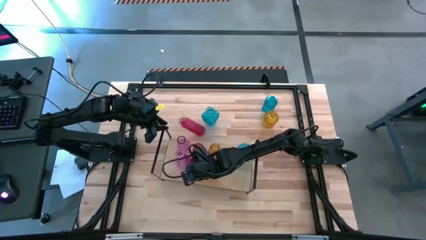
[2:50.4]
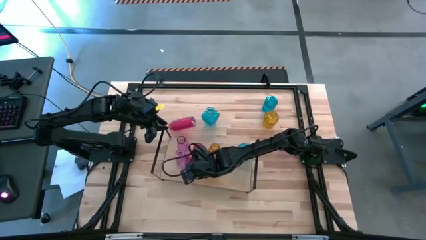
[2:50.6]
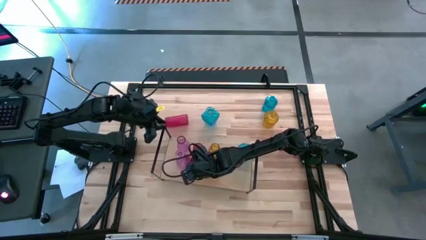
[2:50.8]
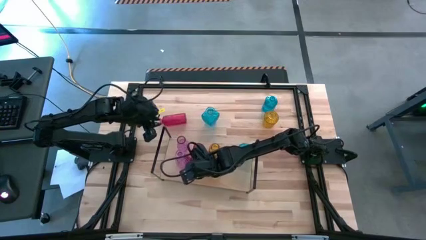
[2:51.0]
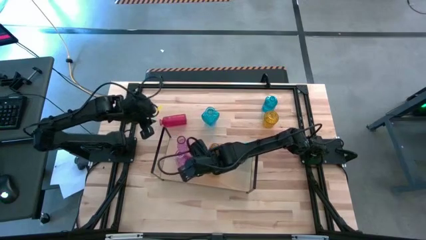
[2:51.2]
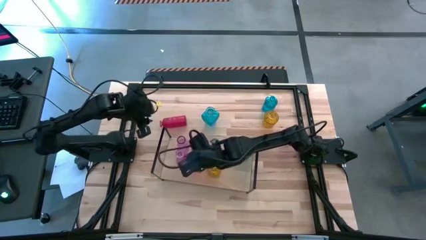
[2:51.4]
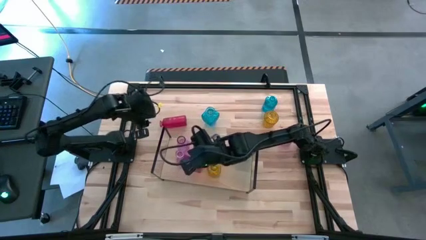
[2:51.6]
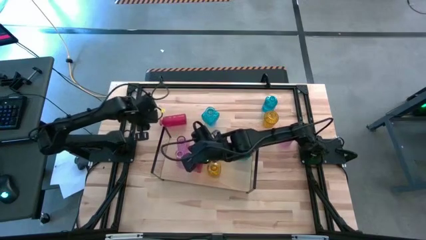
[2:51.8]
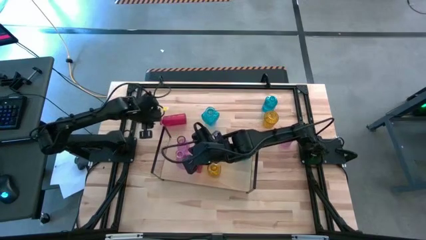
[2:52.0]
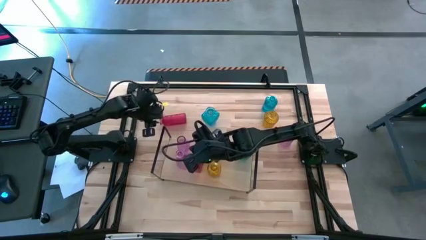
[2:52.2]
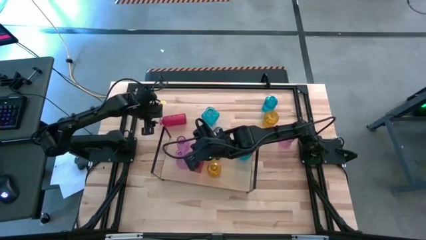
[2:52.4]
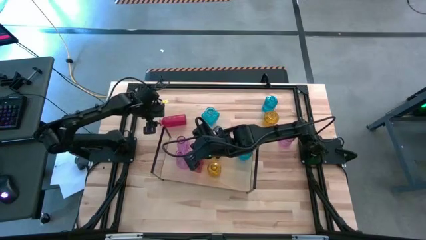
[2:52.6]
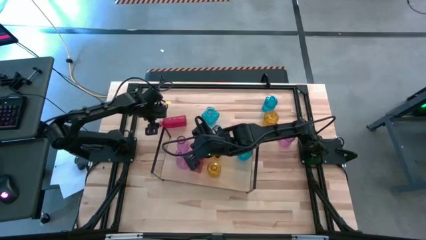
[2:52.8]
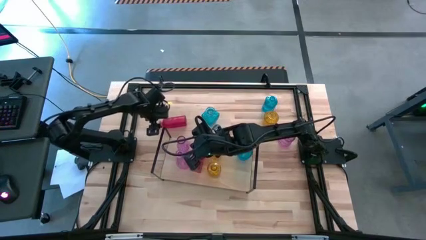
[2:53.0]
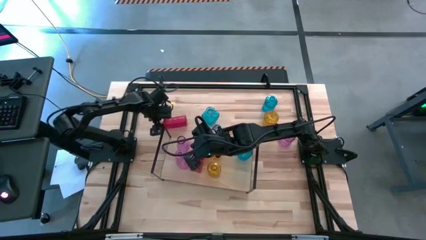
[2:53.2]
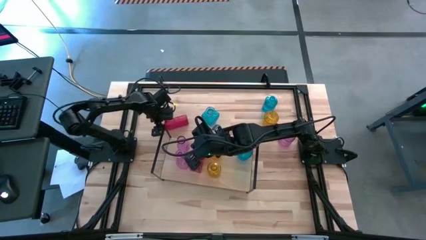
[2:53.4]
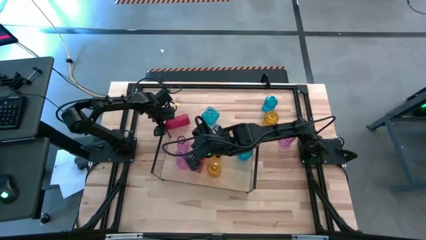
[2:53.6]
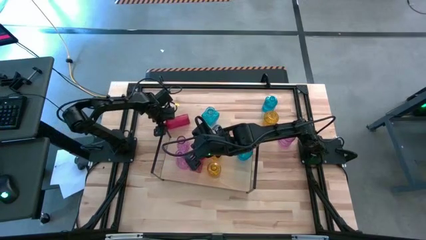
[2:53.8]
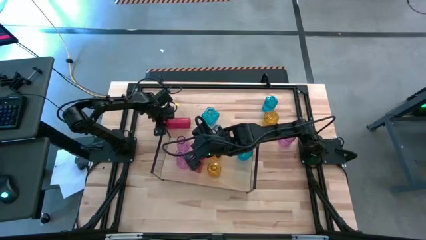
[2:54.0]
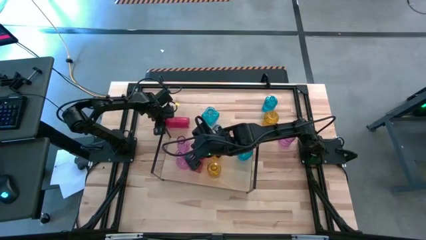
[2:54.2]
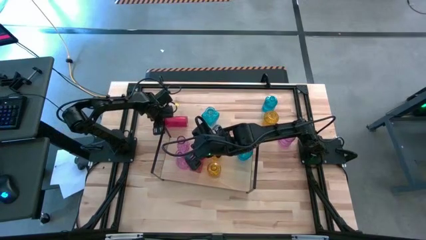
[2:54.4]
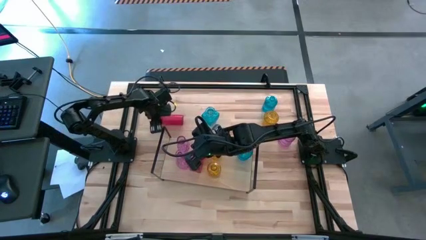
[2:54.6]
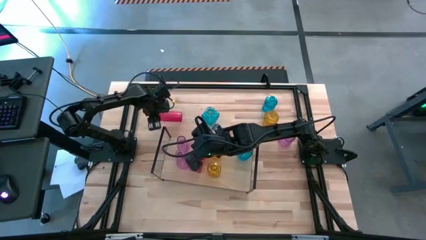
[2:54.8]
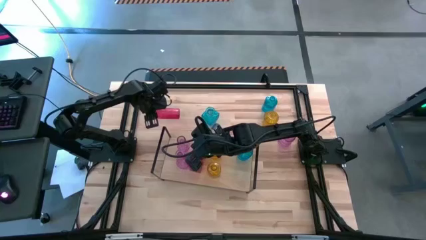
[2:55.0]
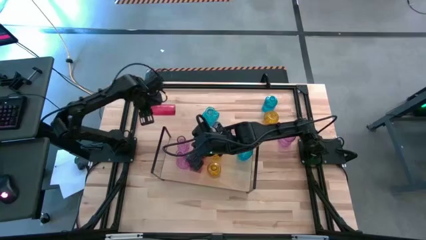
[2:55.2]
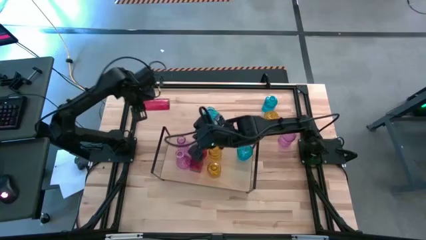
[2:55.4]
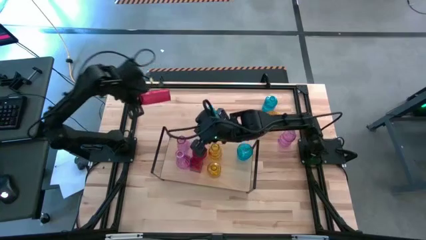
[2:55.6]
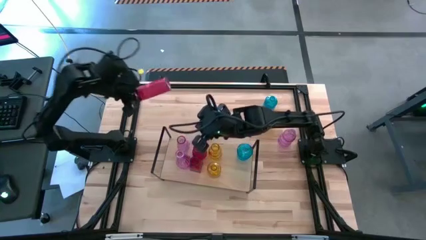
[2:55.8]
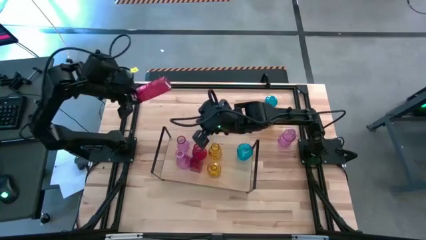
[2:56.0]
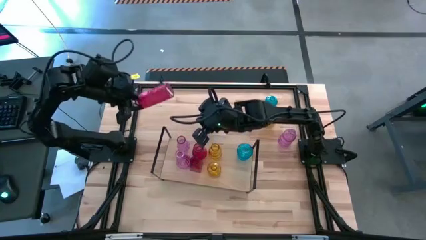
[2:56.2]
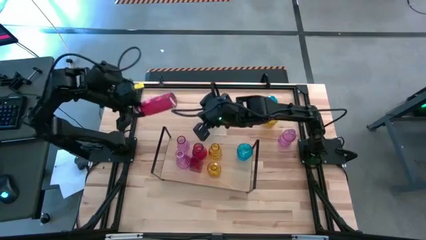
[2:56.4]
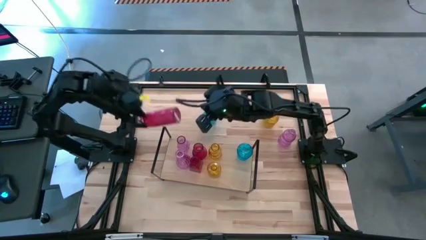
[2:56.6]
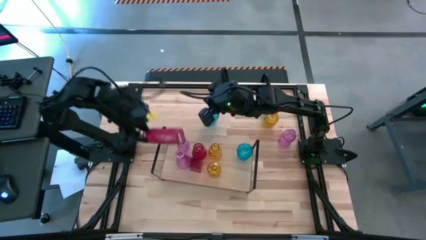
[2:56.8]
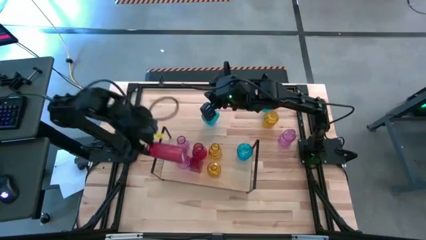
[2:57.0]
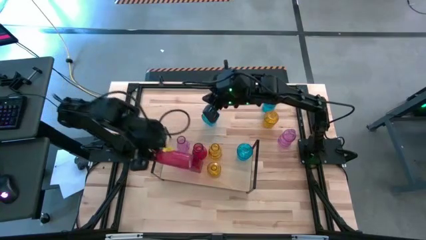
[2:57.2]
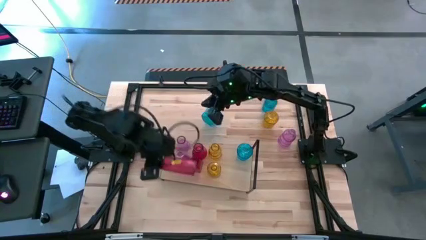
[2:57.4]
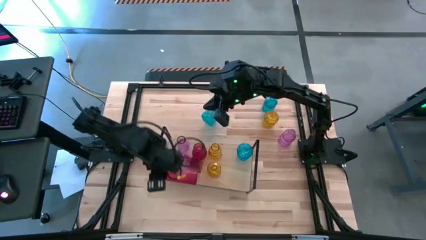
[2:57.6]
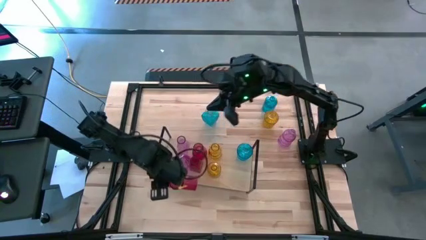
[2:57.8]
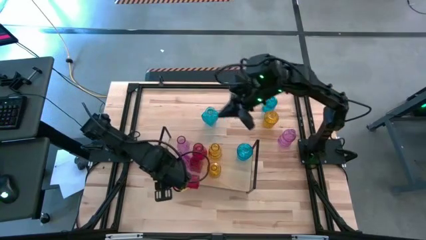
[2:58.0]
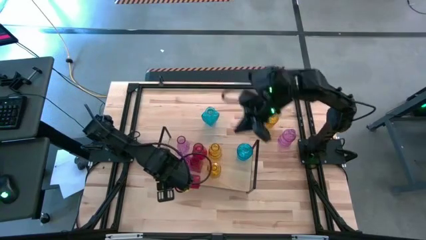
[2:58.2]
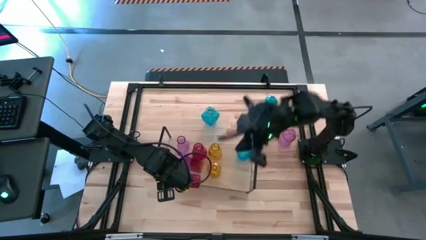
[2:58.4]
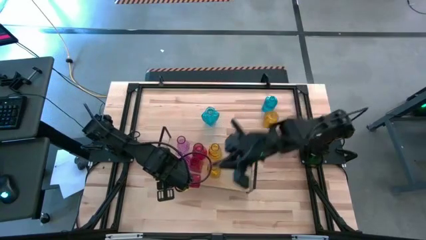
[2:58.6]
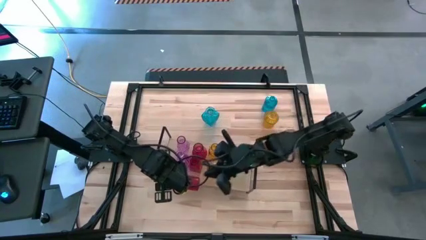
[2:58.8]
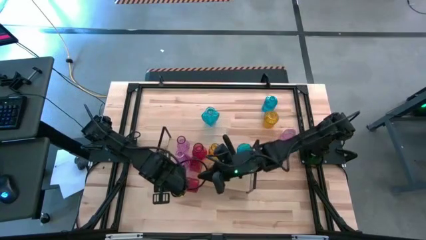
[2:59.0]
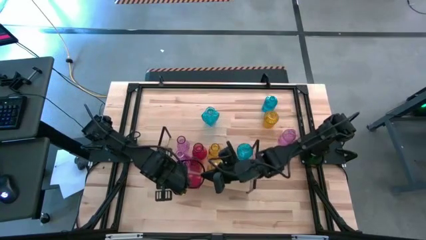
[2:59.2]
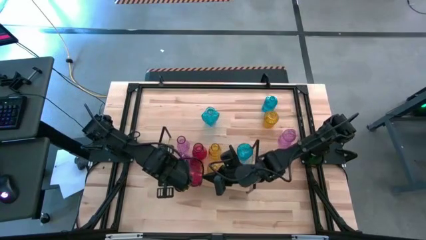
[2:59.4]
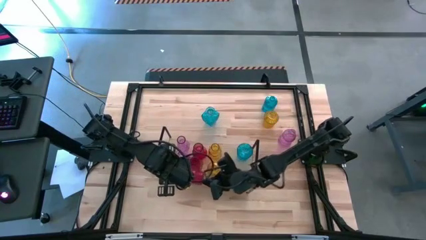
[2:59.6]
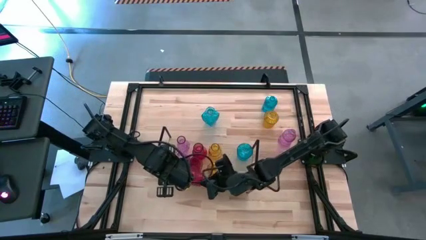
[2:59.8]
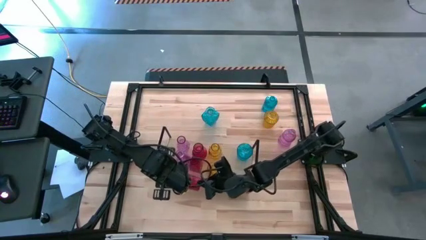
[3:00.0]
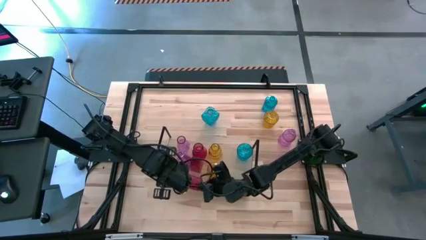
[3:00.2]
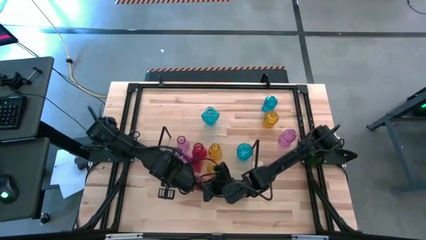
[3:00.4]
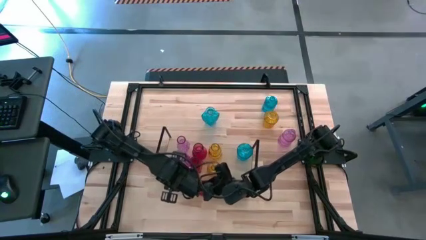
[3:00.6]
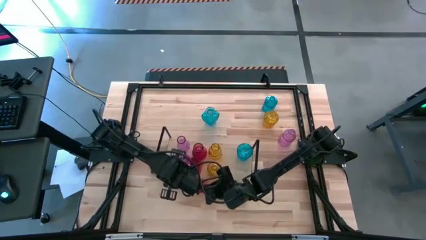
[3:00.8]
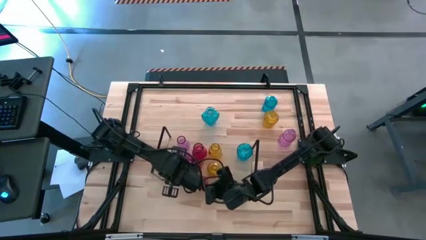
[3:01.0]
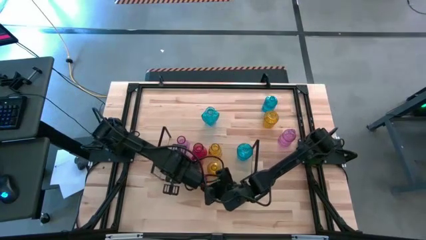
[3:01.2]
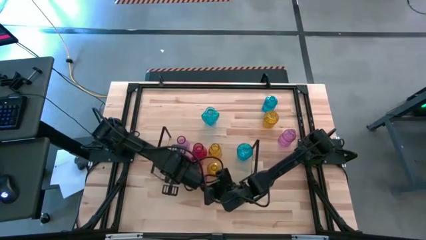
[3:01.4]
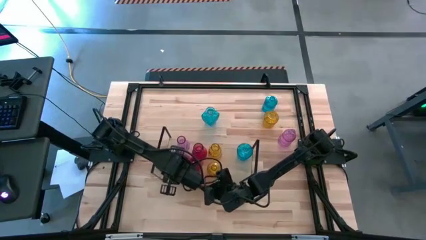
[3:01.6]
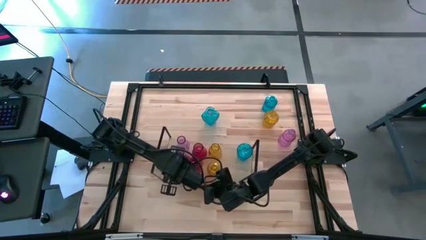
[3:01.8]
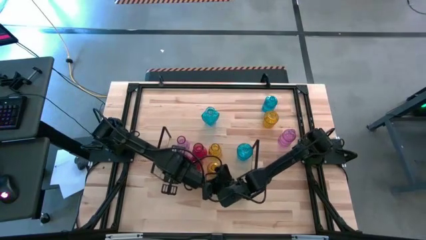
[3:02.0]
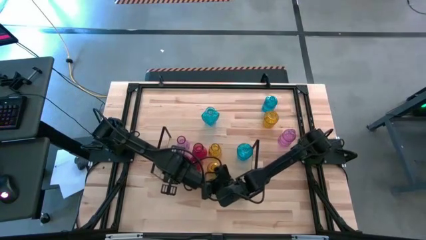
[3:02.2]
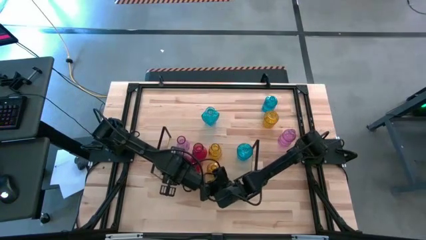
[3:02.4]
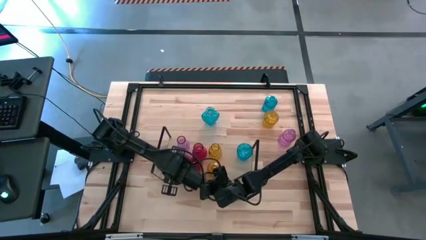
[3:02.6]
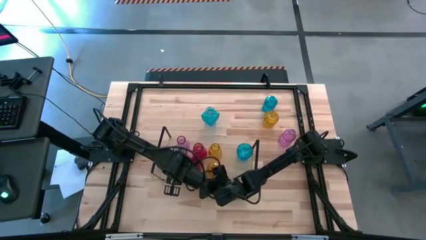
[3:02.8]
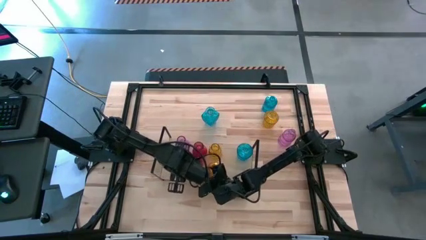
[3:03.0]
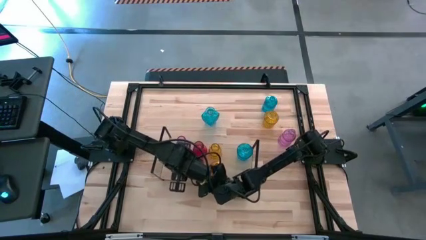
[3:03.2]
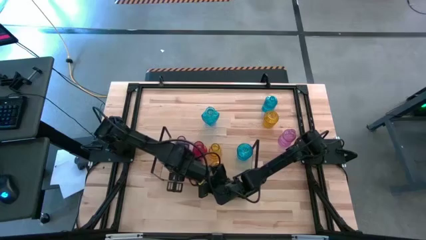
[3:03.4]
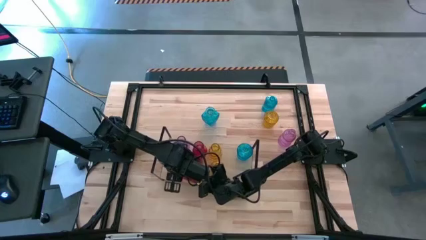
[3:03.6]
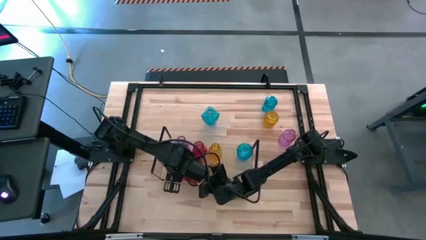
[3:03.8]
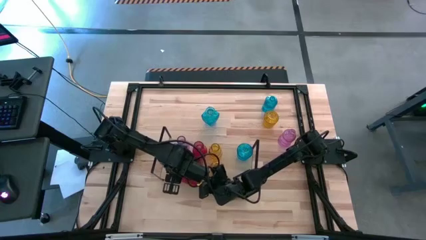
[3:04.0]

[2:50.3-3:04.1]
Task: sort vases onto shelf
Put the red vase on the shelf aligned with the other red vases

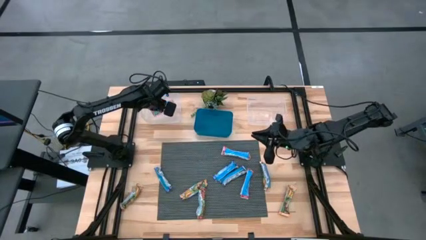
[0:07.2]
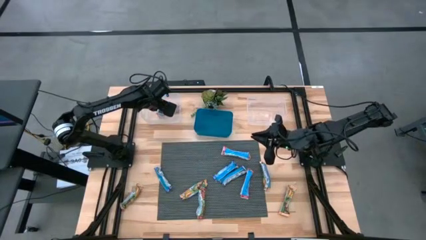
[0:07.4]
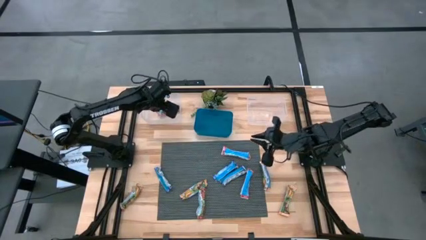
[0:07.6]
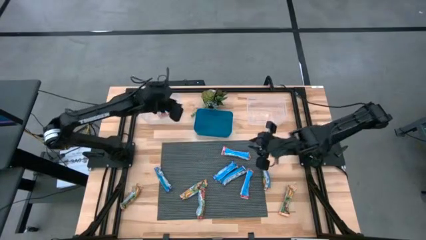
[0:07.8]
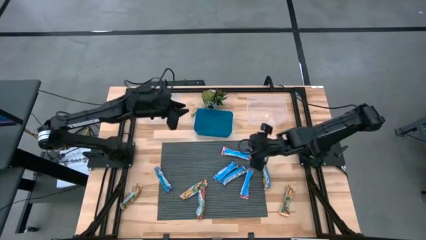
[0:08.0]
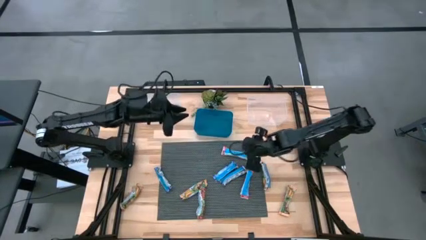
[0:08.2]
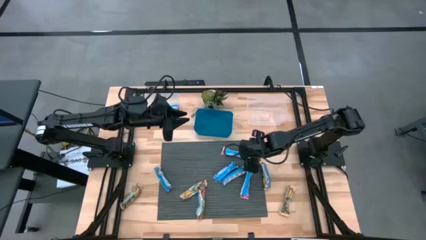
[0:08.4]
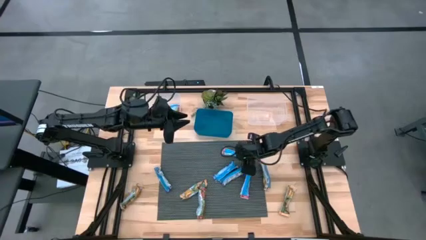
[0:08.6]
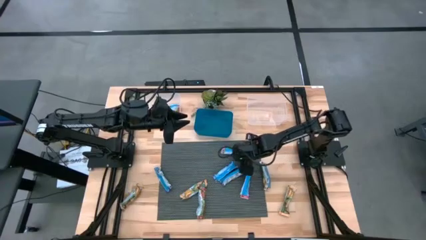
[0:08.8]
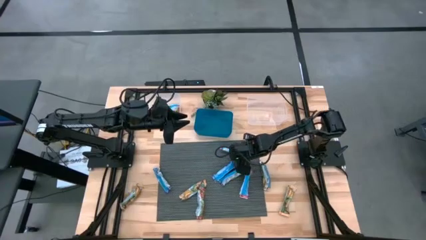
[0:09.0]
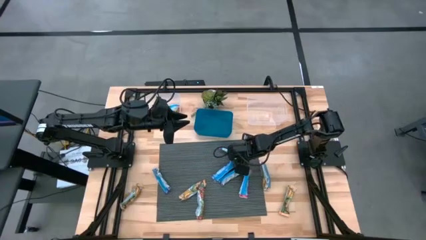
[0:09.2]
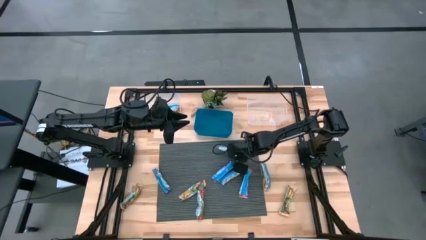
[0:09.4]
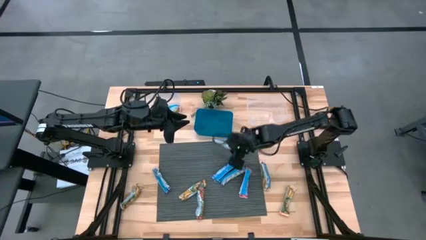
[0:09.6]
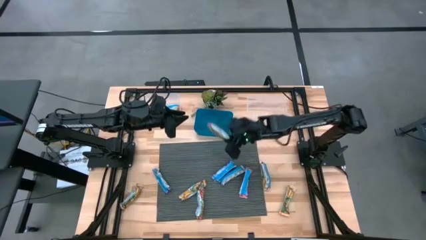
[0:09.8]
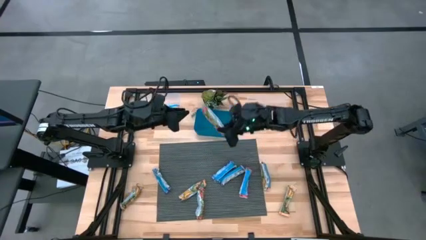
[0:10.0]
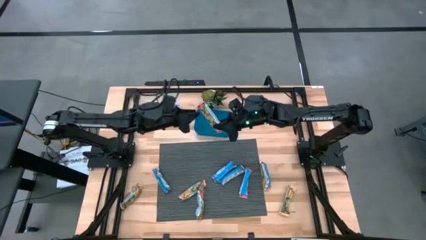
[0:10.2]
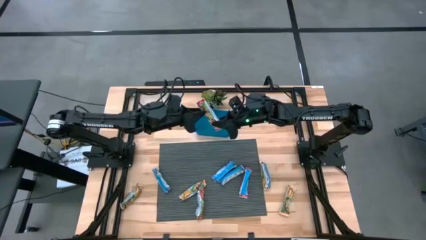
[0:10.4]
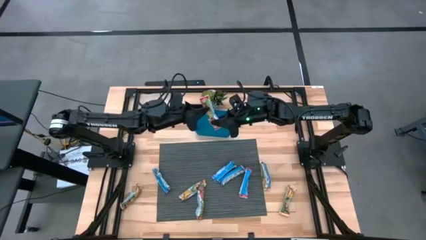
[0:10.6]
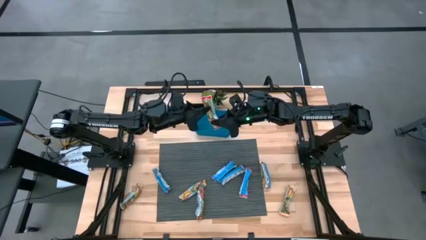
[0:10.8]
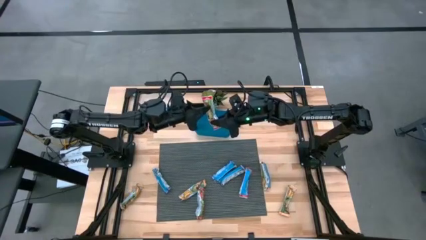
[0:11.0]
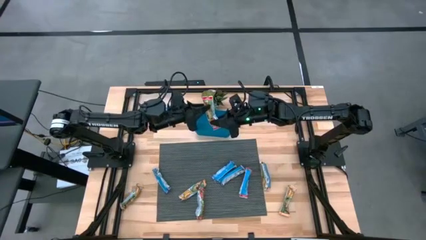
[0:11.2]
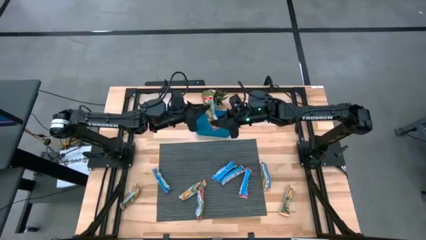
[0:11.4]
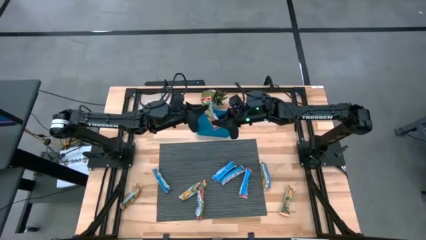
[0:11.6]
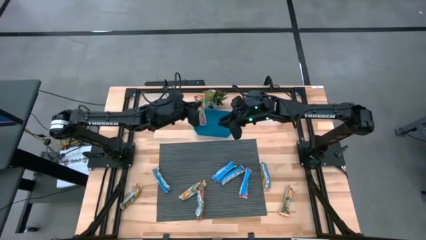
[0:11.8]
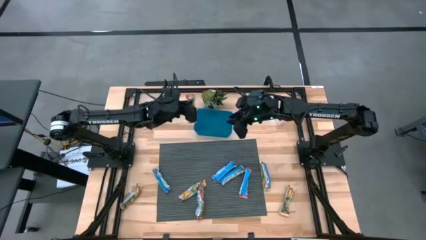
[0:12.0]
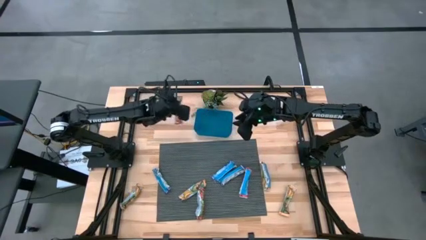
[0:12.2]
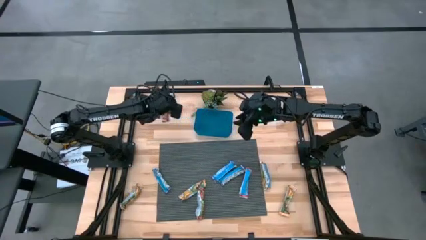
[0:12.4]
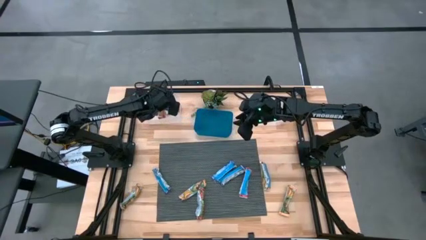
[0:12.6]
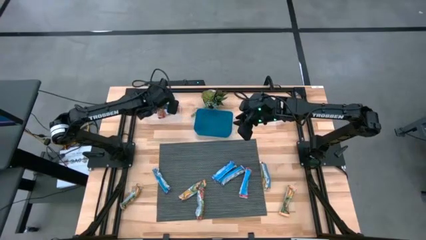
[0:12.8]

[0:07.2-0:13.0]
Task: Pick and place Granola Bars by type
Put the red granola bar into the left transparent bin
